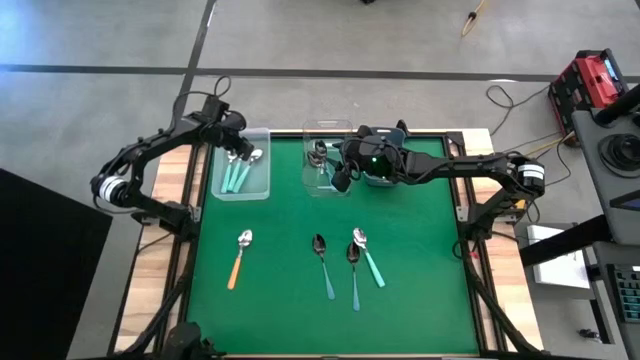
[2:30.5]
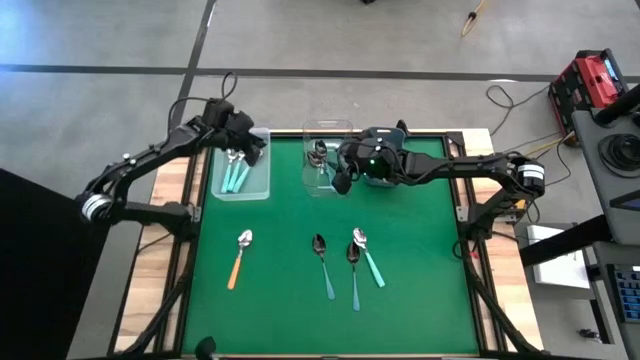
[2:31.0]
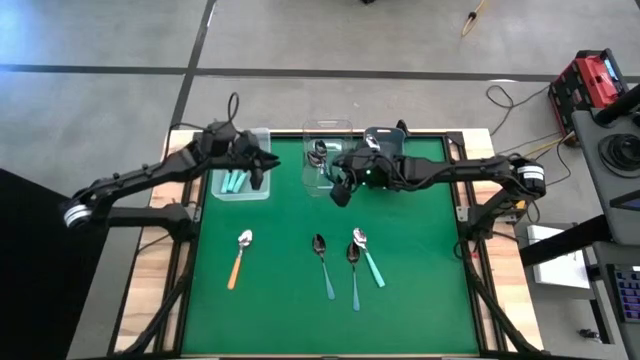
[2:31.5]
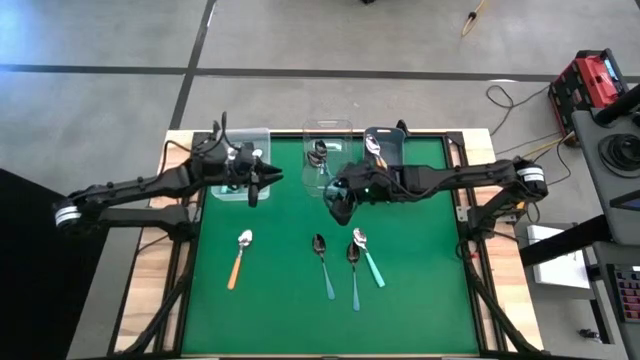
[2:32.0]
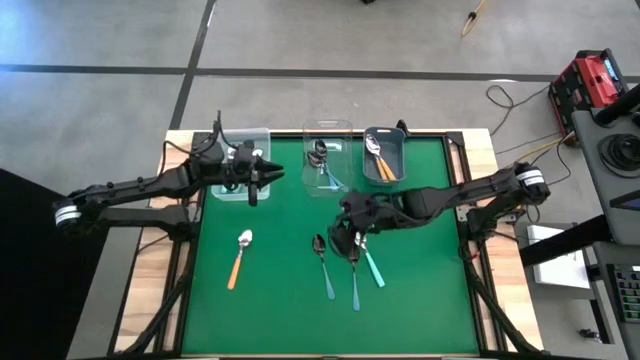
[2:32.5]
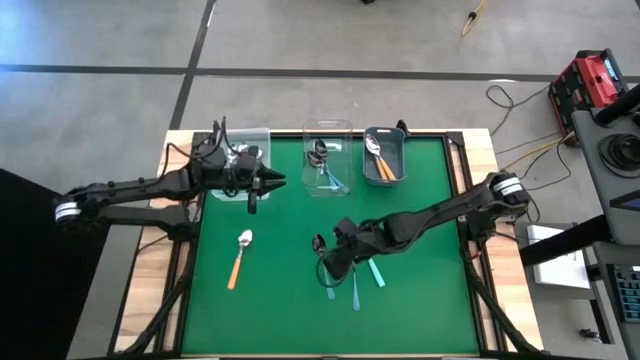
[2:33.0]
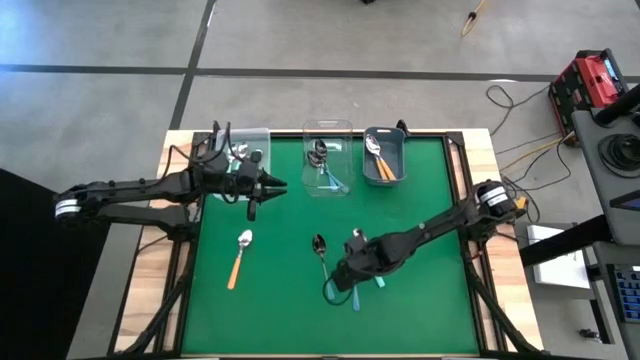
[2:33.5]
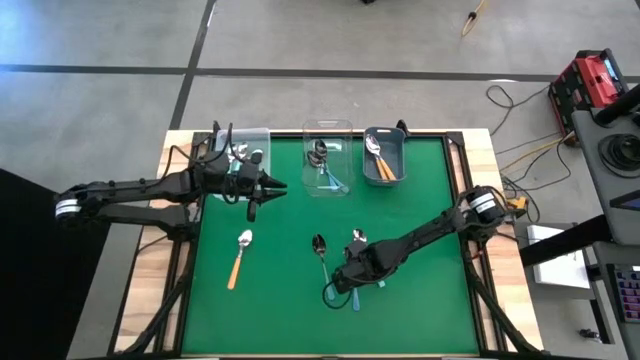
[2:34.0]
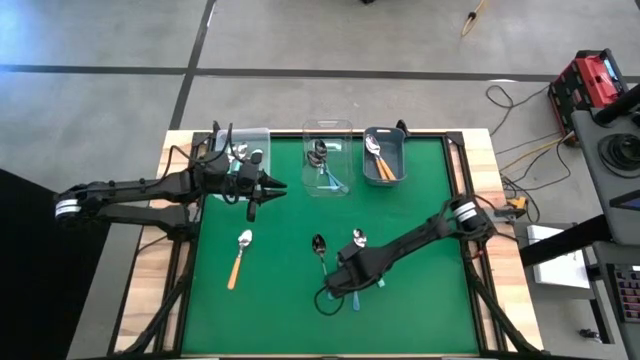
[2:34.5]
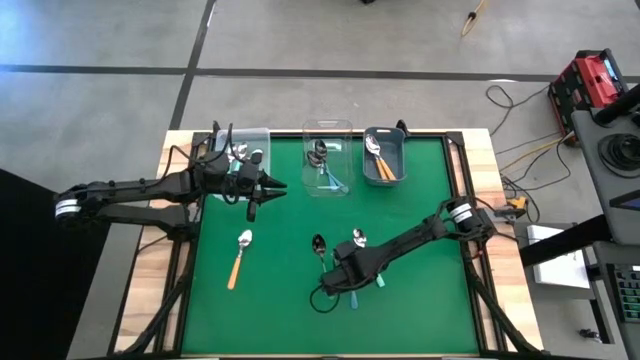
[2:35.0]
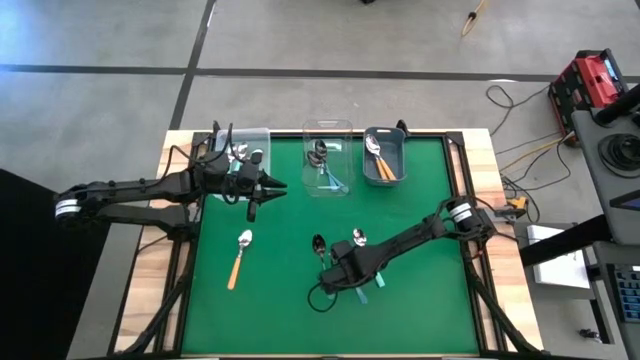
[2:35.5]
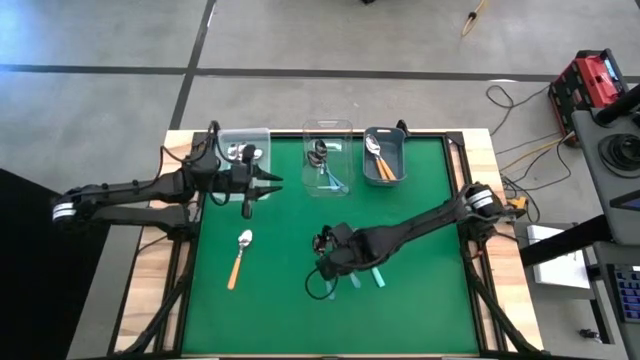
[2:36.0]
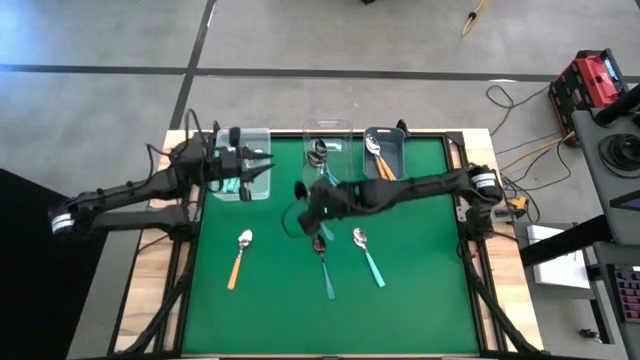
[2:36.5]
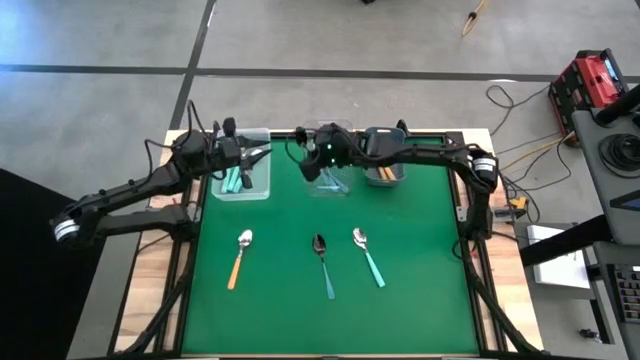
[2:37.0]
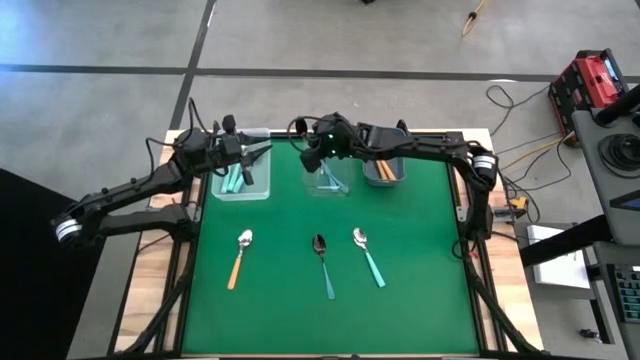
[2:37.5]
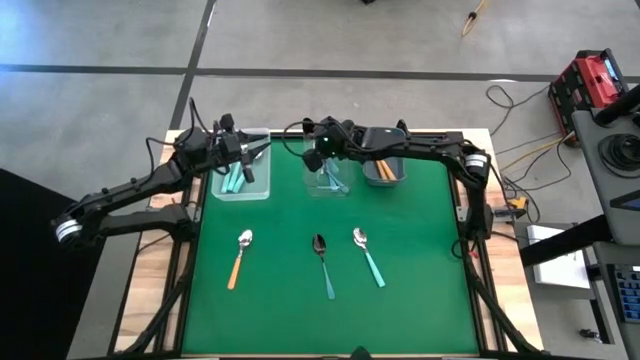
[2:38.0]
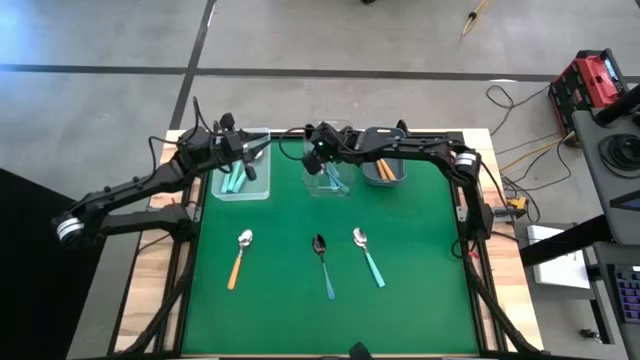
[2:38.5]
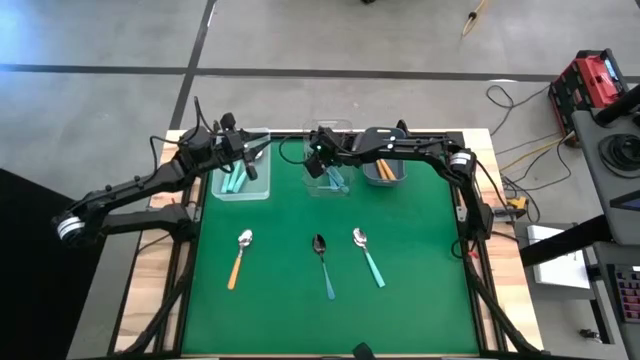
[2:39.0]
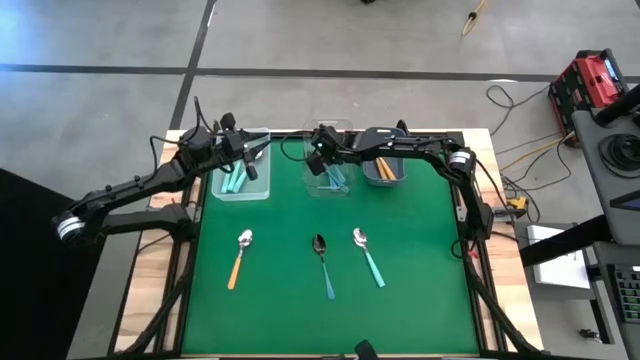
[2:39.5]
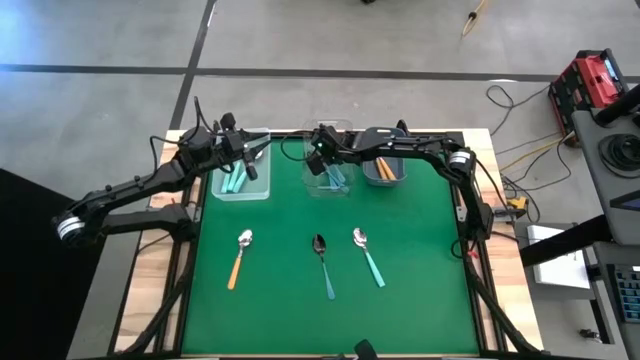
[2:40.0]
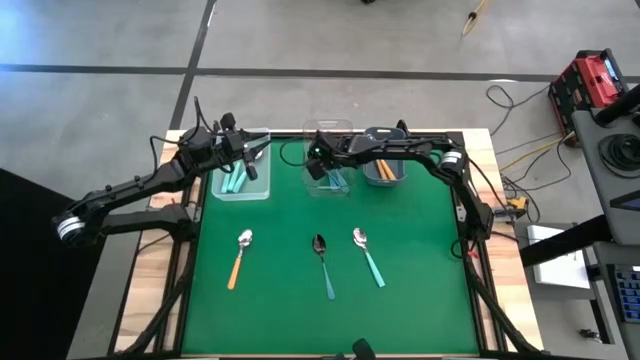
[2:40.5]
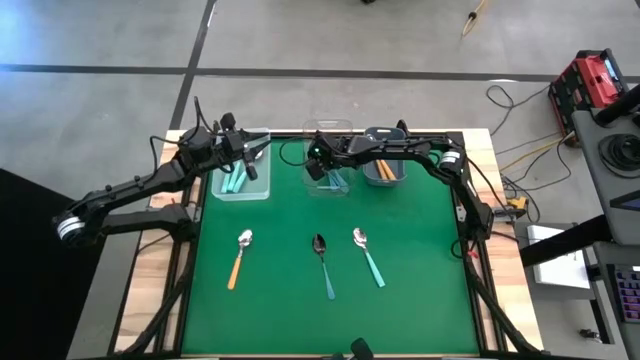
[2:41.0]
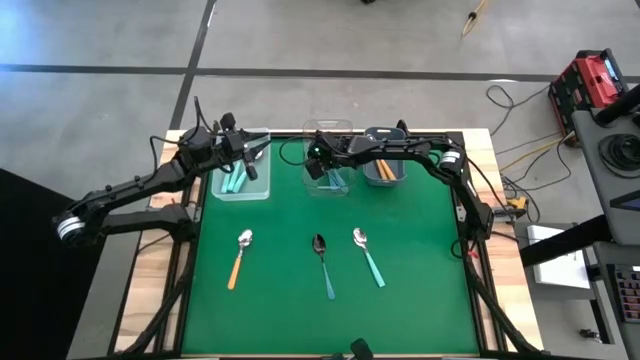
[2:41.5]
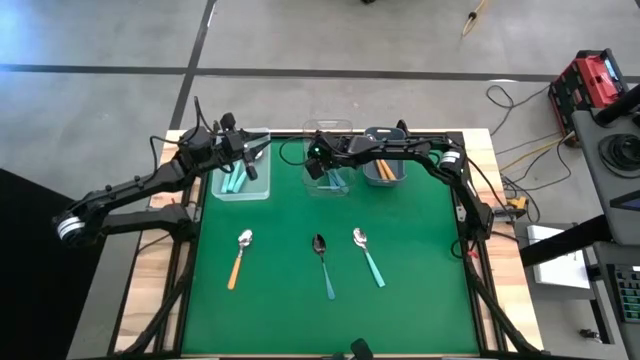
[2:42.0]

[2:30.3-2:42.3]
Task: Sort silverware by color (type)
Put the blue spoon into the transparent bin

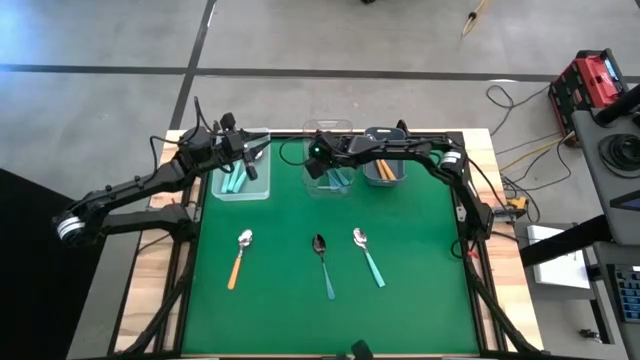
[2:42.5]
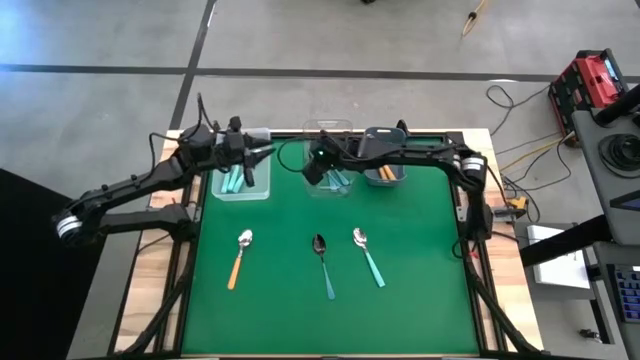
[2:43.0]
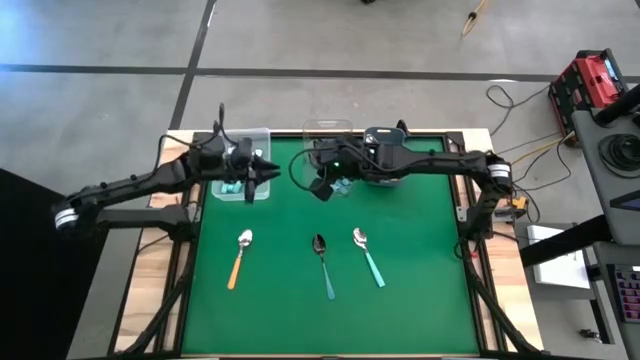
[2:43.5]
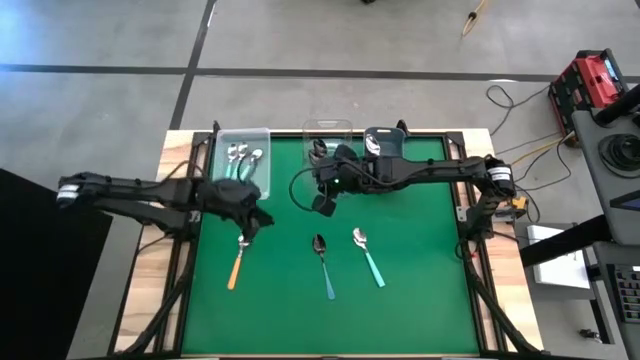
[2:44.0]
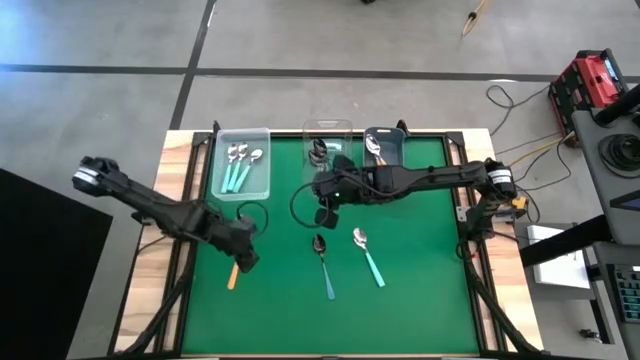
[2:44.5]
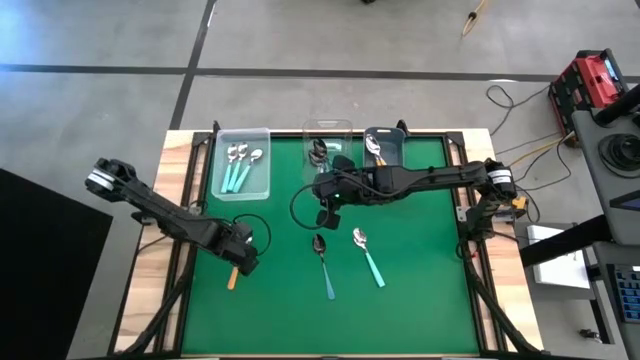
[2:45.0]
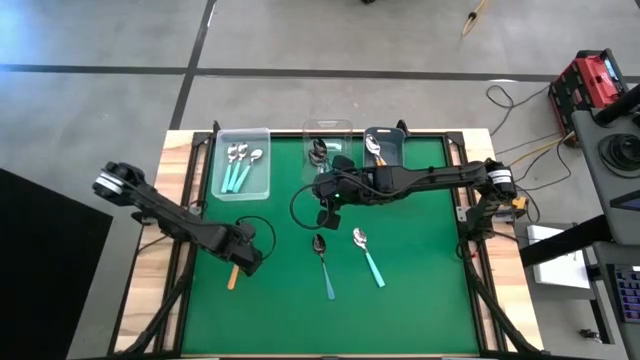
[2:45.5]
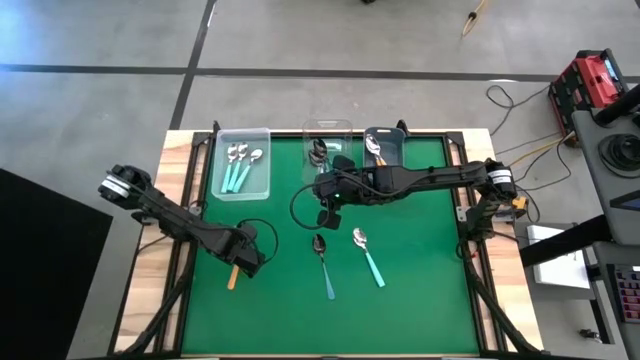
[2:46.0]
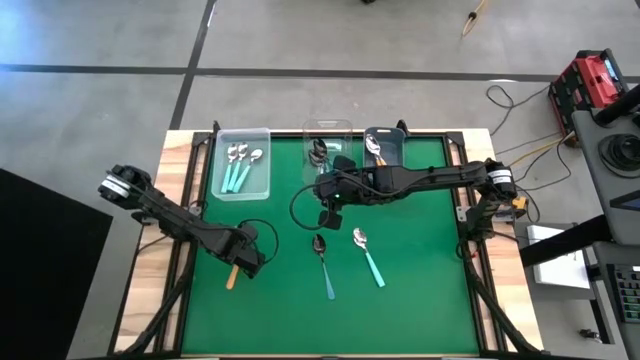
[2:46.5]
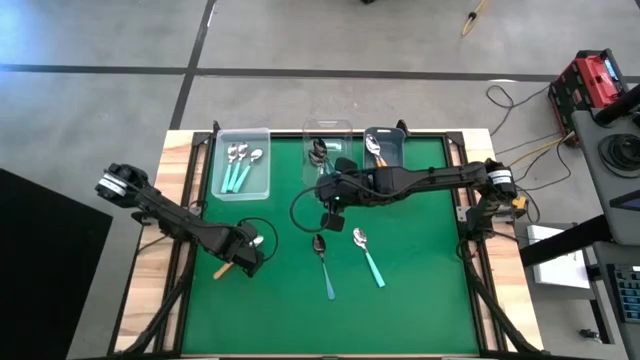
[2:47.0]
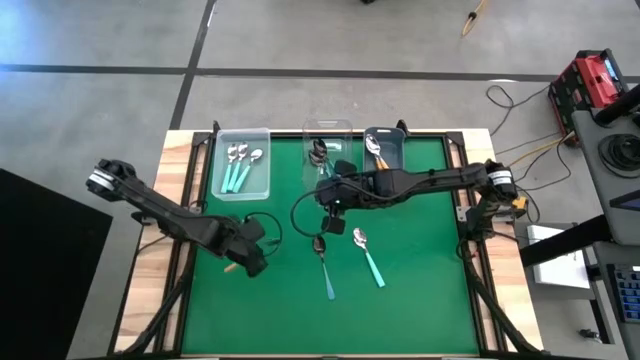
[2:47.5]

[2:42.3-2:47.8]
Put the yellow spoon into the blue bin

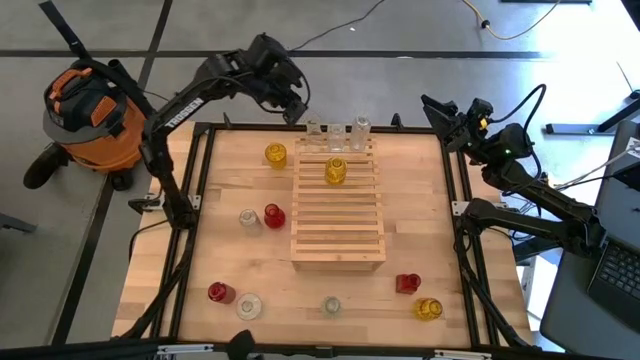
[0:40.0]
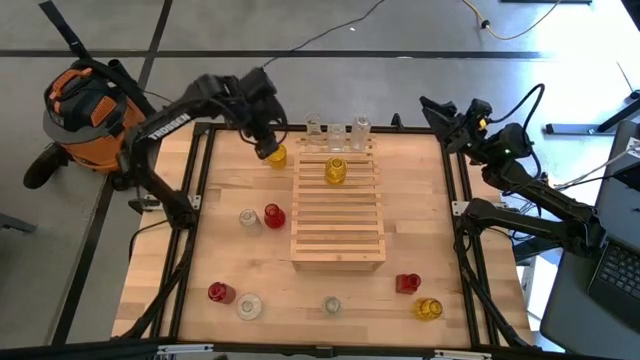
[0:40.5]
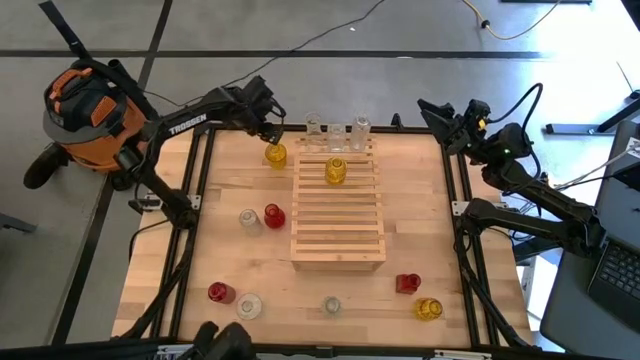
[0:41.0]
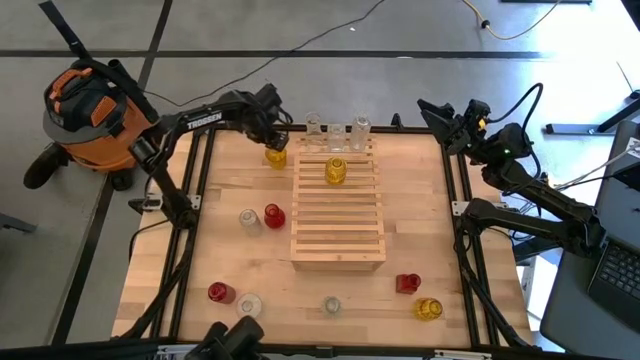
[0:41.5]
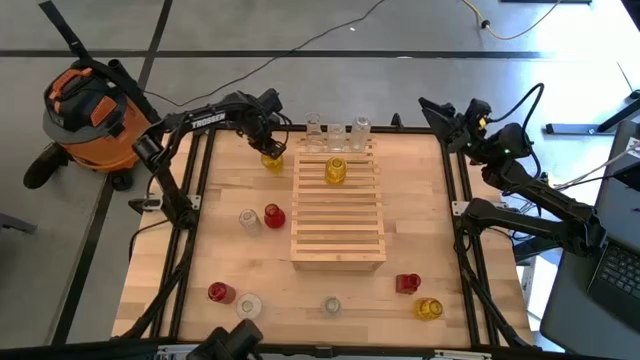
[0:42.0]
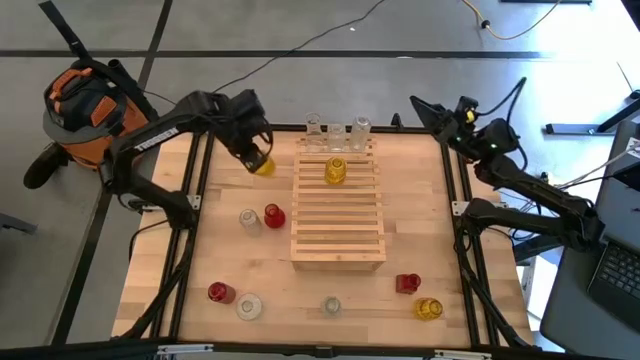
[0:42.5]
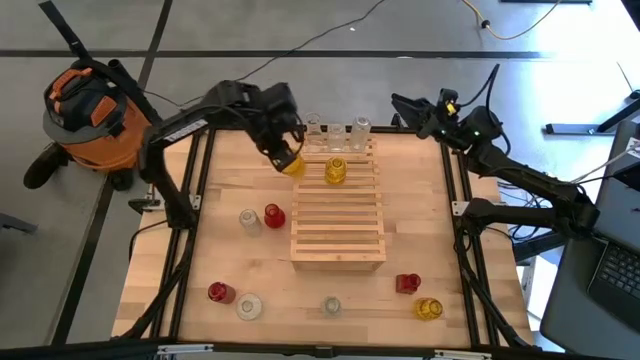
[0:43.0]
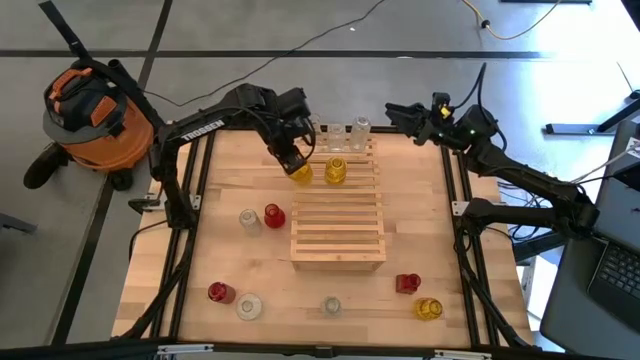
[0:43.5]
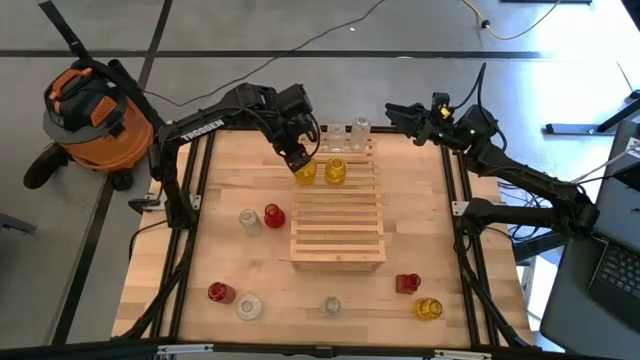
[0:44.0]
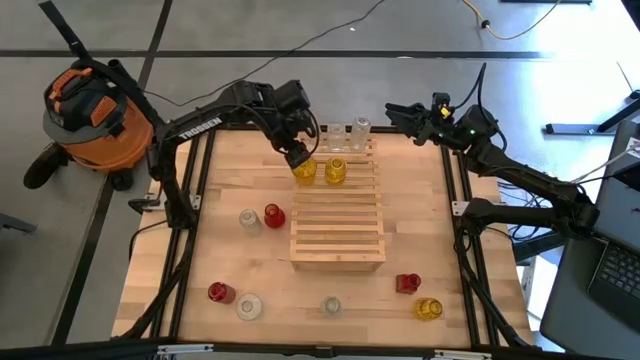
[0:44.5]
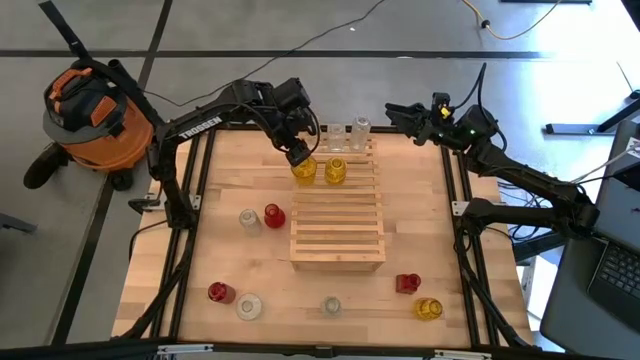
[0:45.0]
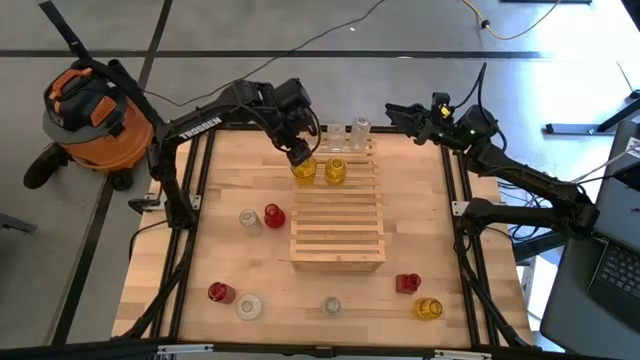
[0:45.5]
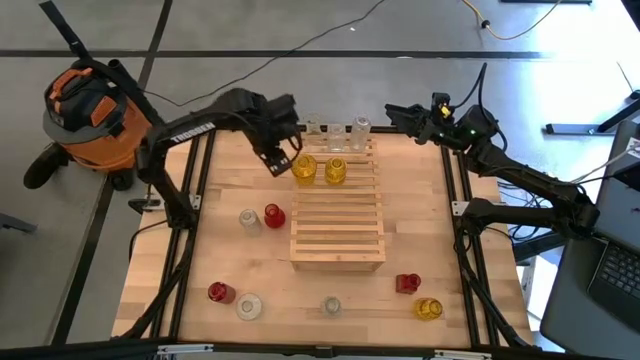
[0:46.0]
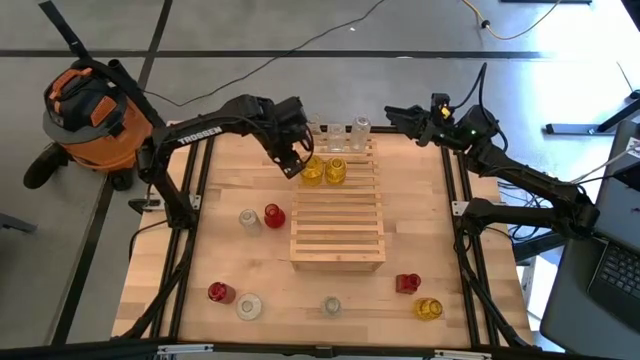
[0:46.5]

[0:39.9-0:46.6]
Task: sort vases onto shelf
Align the yellow vase with the yellow vase on the shelf
